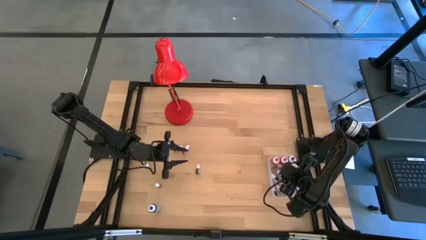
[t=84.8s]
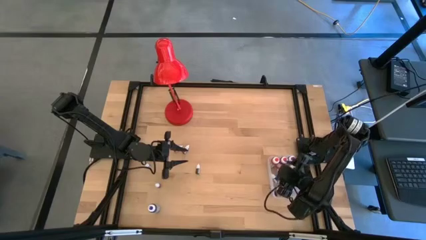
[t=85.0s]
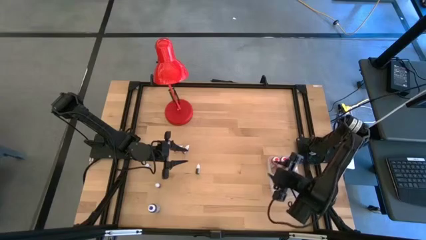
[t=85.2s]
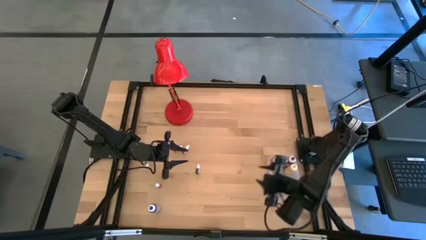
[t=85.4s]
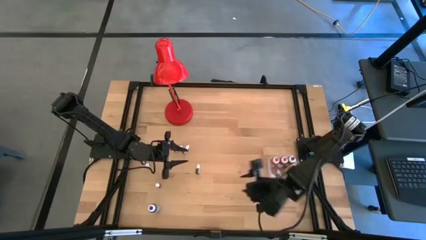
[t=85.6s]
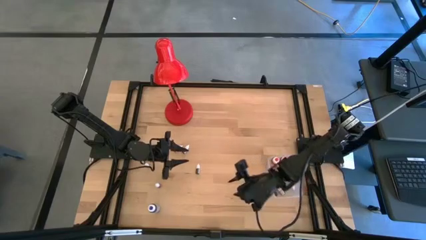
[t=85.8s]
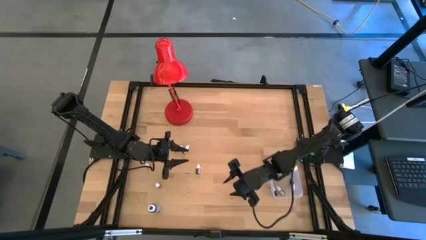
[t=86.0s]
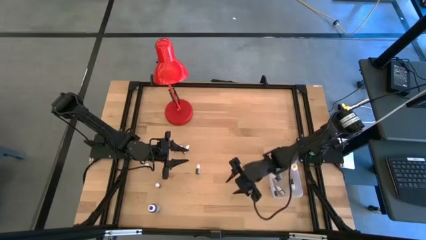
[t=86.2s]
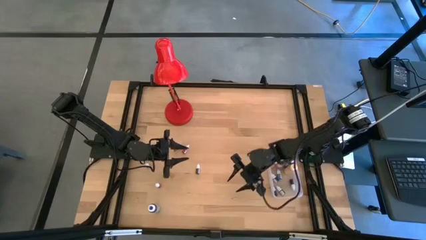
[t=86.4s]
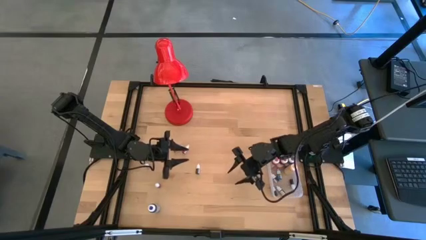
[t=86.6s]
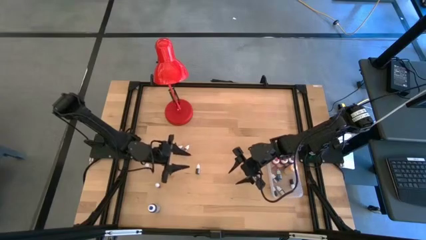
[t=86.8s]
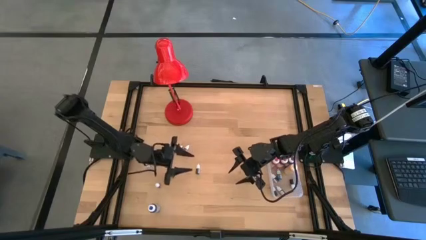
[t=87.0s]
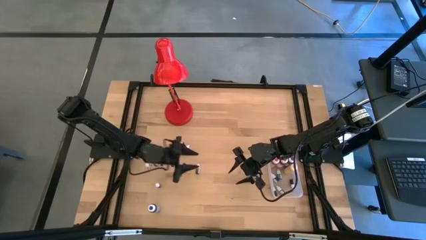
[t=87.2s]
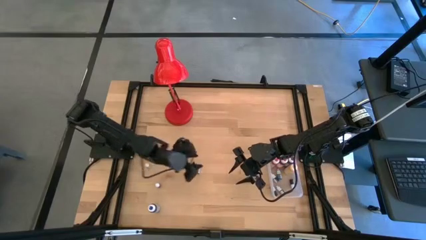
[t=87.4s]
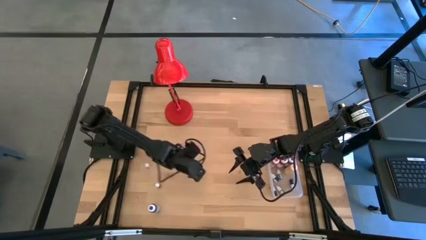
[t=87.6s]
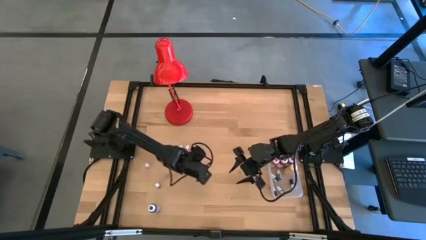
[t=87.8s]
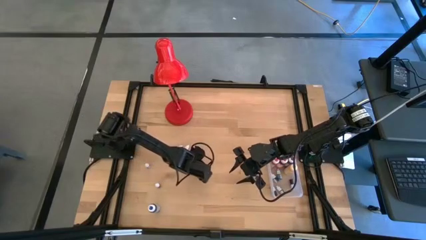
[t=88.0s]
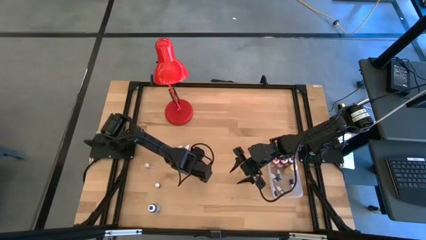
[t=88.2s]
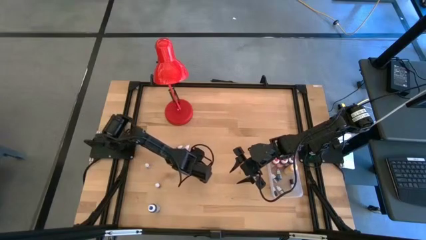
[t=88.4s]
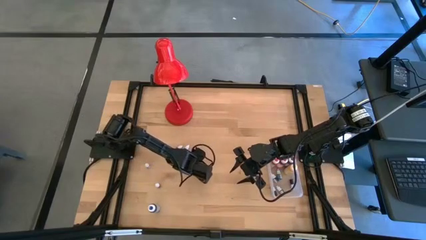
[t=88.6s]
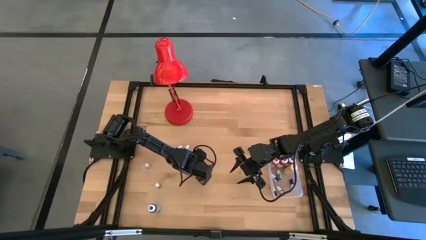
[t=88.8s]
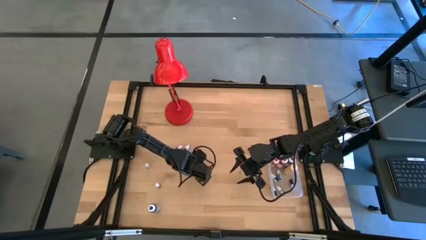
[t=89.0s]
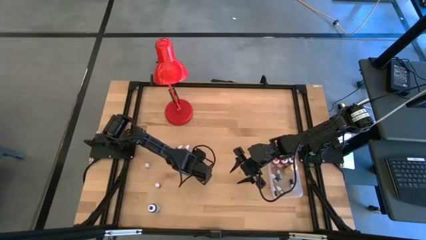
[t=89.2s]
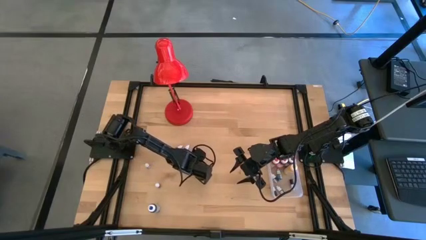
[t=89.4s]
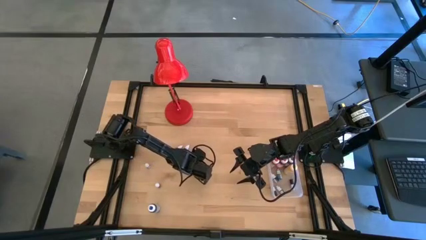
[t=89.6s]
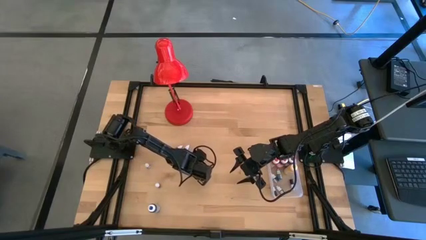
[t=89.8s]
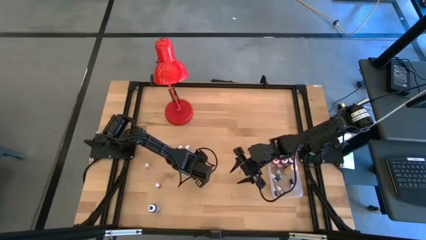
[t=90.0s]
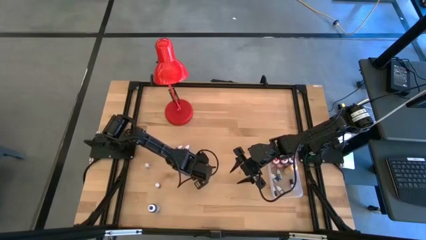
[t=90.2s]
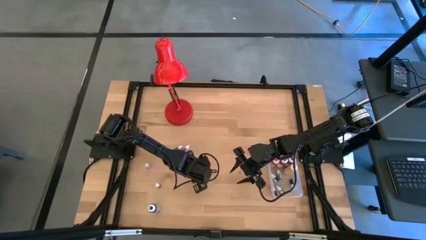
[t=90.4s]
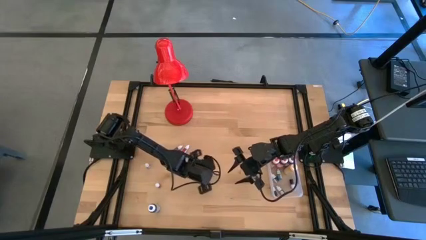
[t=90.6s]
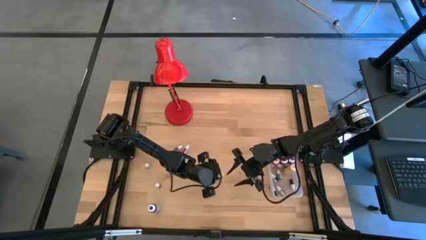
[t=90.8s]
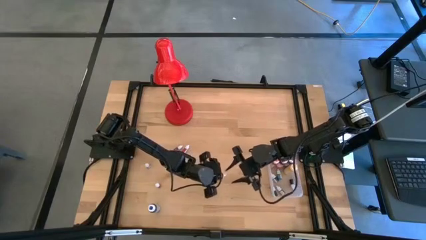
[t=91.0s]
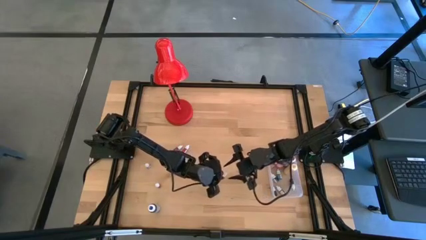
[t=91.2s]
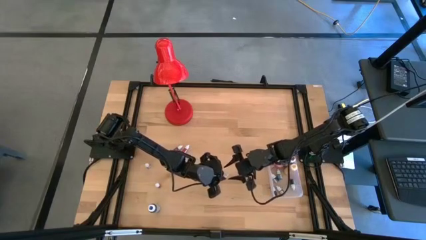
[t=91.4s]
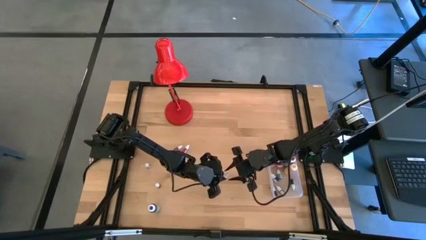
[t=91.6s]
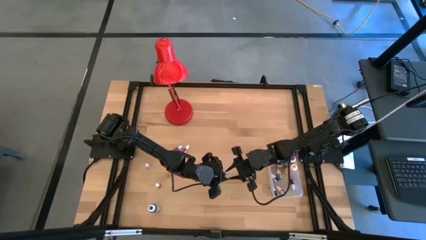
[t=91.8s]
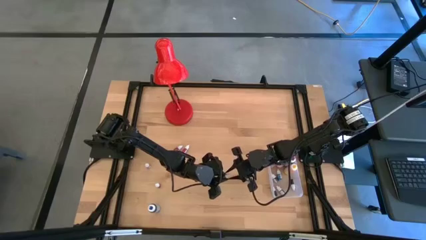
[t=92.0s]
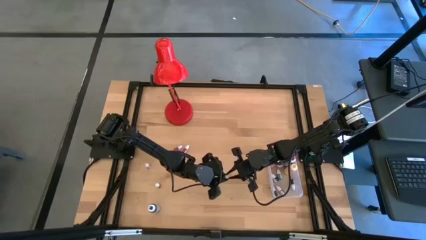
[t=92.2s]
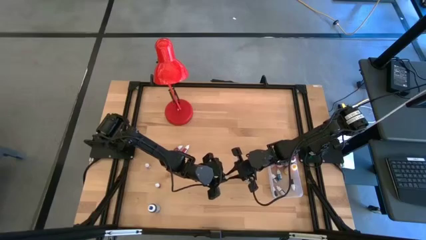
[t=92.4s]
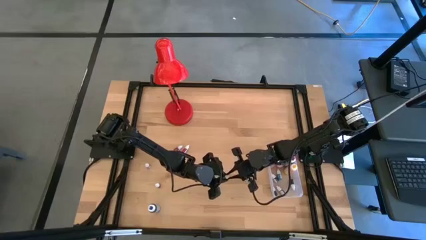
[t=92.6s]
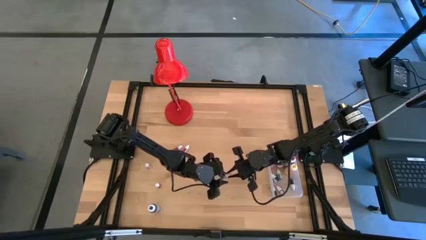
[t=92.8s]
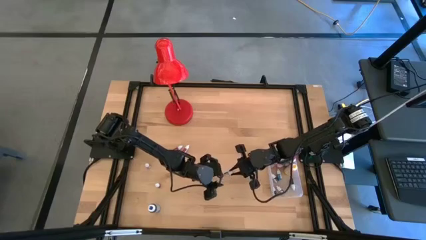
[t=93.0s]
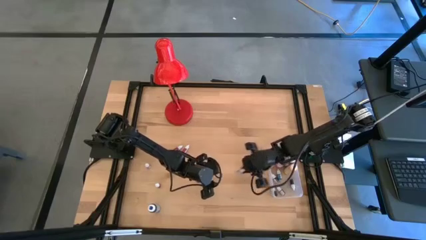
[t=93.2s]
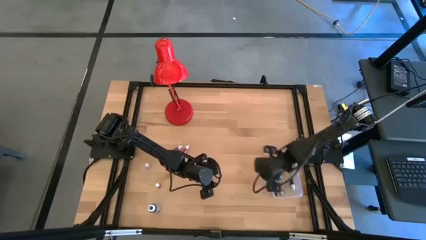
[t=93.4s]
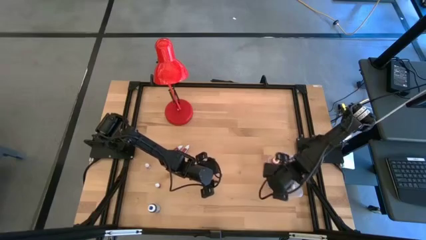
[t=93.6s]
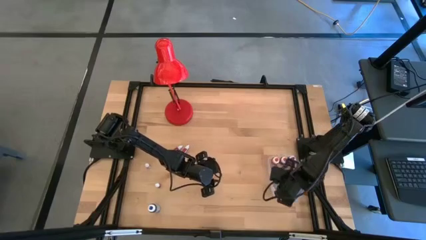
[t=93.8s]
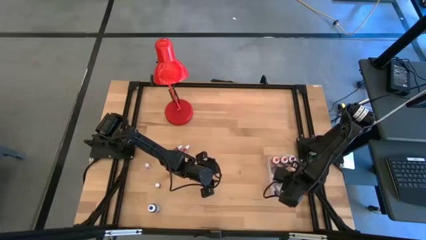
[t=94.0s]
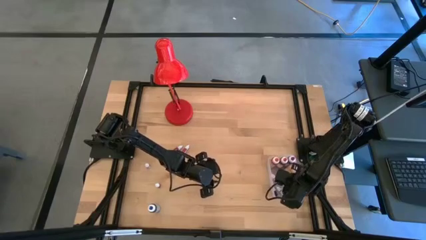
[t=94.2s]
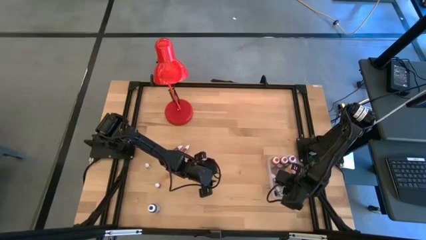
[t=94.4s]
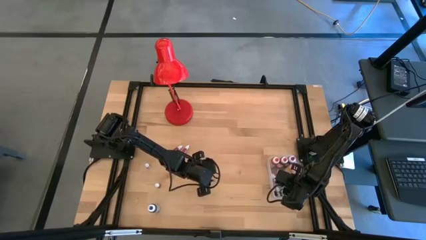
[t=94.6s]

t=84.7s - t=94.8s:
Task: Pick & Place food coloring
Put the right small black bottle into the transparent container

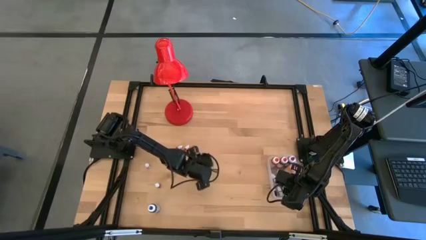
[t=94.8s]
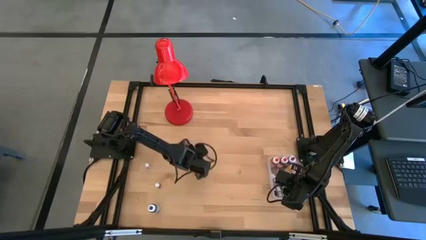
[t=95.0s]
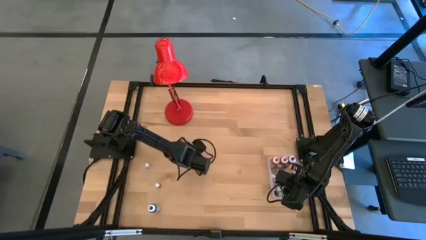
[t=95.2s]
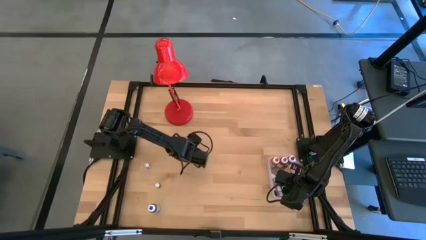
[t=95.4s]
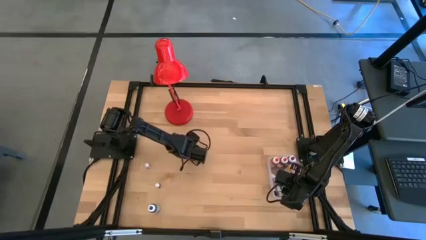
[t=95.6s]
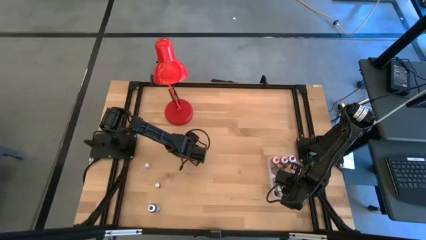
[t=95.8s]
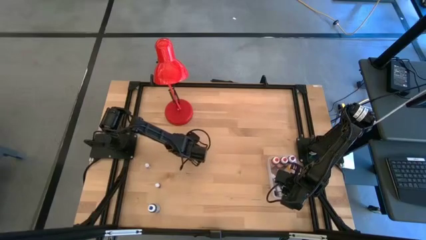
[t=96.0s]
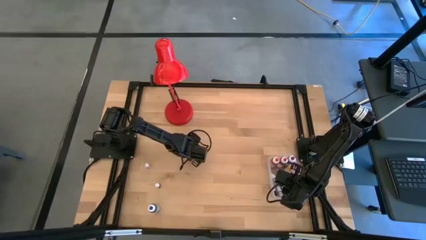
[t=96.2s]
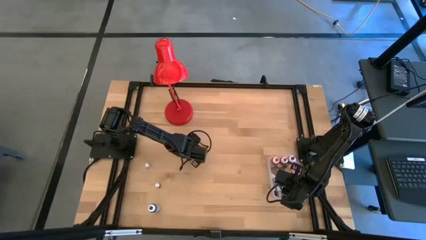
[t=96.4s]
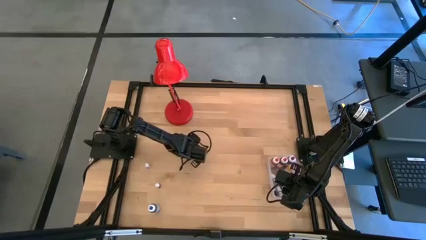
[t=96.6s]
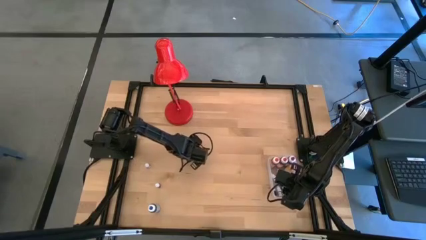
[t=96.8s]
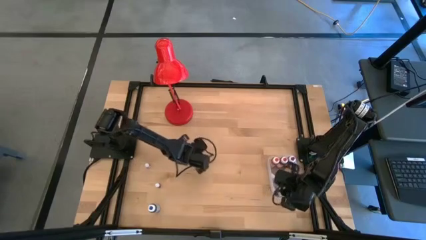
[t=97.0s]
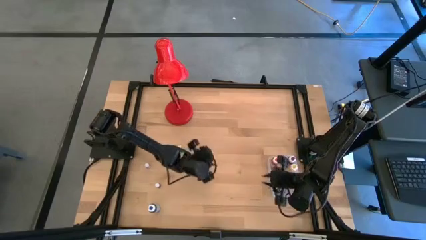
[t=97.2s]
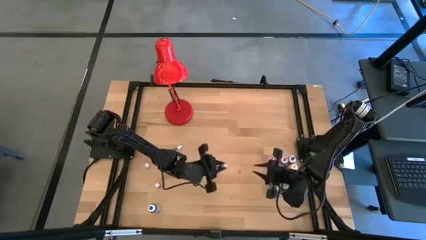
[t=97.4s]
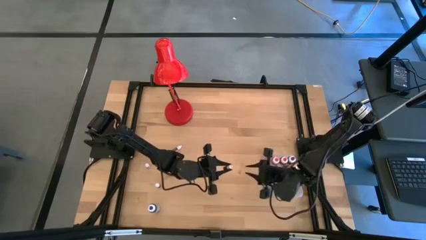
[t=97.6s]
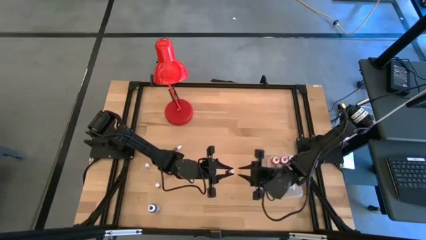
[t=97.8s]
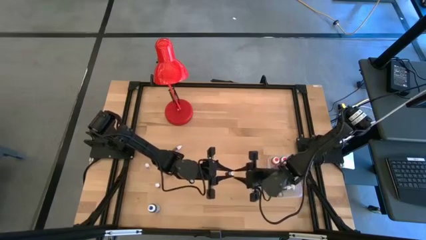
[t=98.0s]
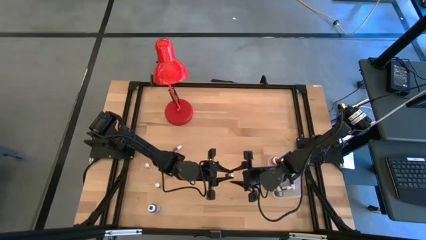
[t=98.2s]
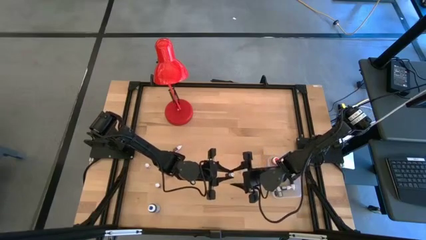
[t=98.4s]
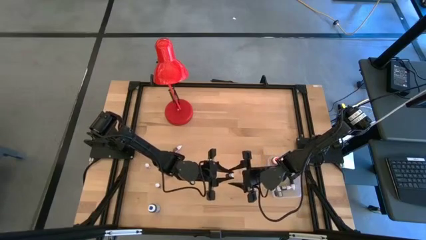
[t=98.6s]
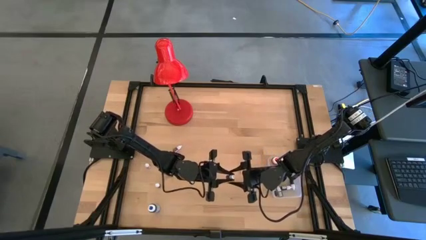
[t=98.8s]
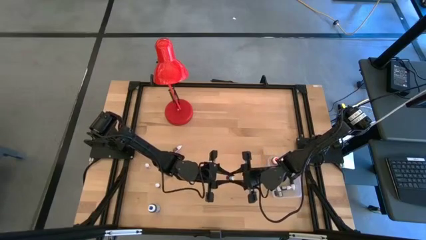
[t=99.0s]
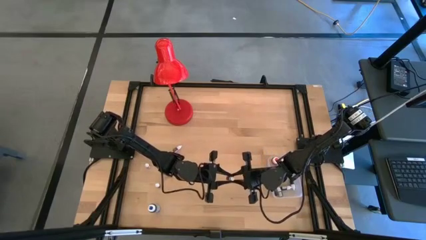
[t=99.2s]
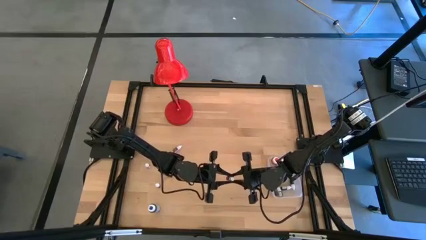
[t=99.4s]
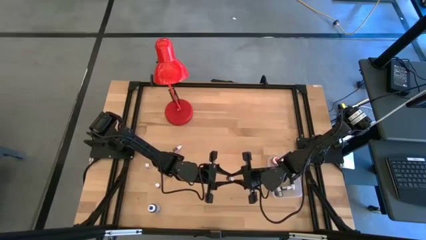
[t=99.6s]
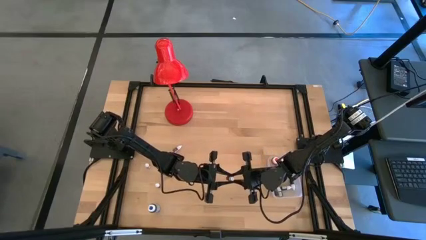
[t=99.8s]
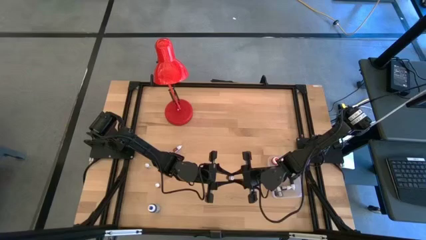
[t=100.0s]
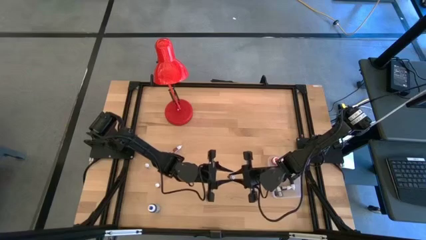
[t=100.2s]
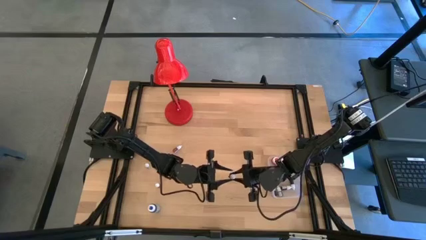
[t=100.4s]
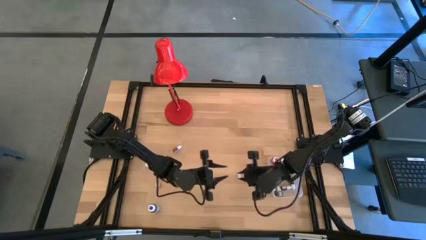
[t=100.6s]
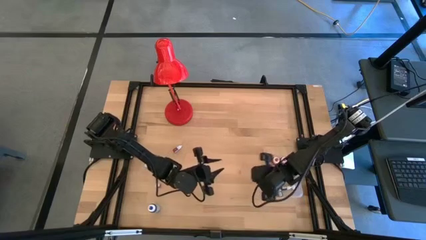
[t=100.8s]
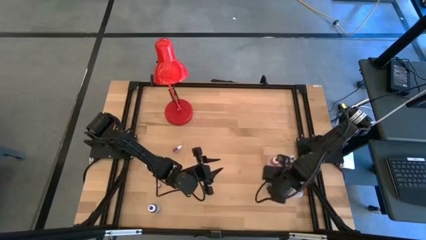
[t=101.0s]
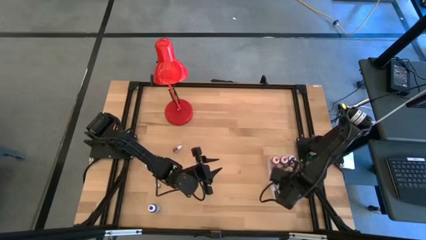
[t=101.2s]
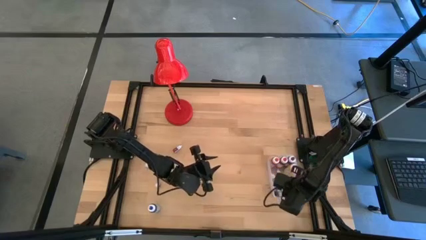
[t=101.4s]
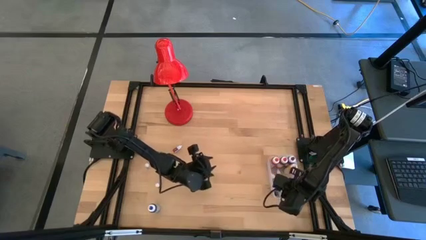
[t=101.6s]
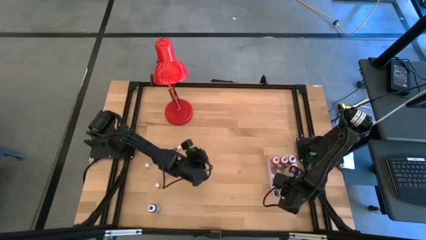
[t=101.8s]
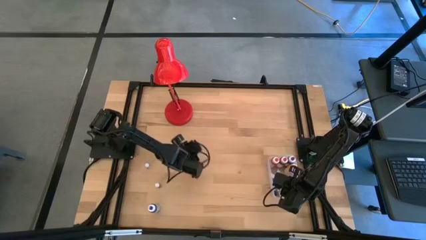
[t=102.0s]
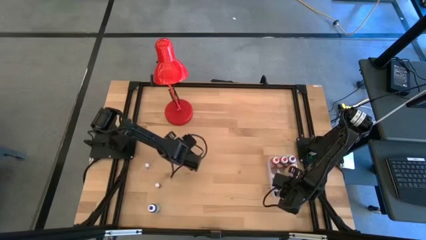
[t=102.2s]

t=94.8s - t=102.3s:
Put the right small red bottle into the transparent container
